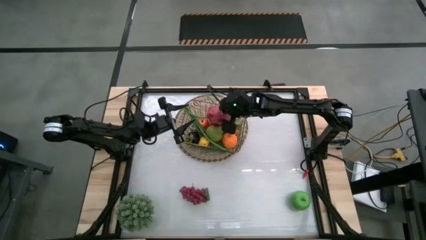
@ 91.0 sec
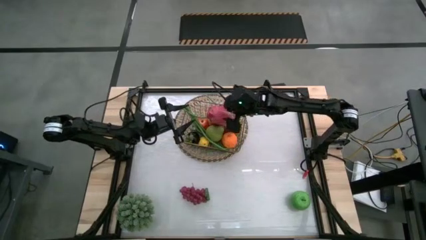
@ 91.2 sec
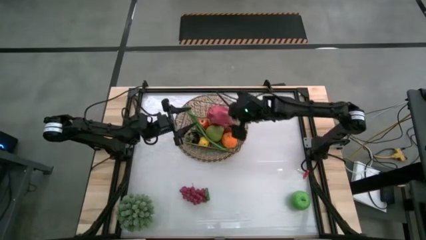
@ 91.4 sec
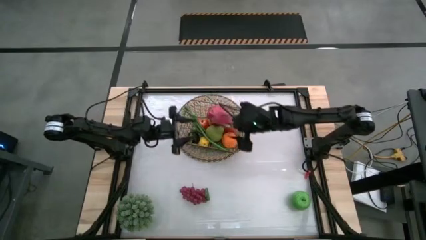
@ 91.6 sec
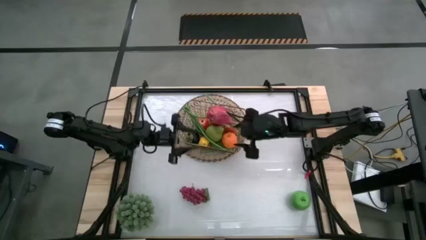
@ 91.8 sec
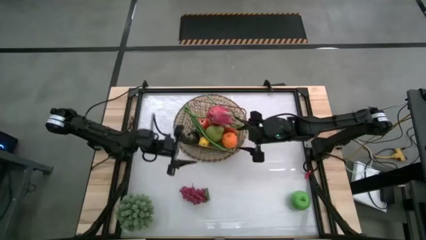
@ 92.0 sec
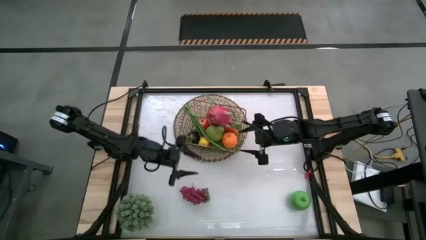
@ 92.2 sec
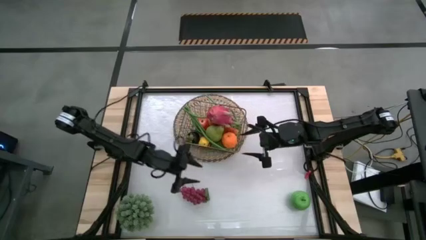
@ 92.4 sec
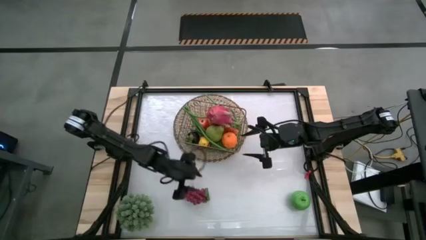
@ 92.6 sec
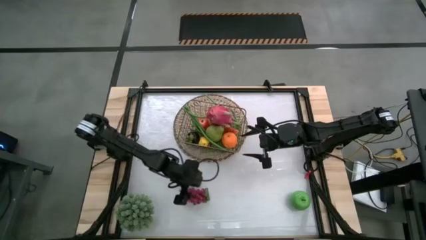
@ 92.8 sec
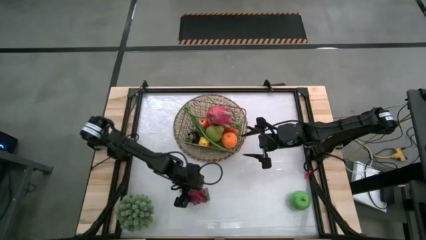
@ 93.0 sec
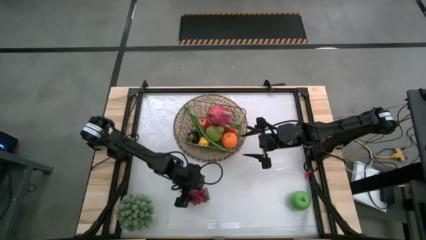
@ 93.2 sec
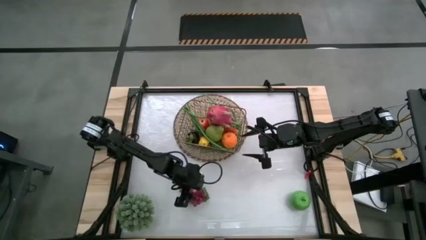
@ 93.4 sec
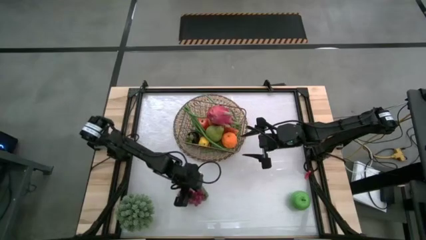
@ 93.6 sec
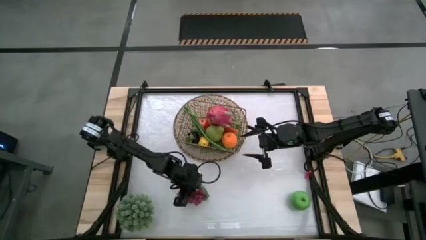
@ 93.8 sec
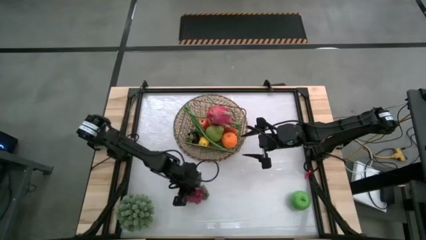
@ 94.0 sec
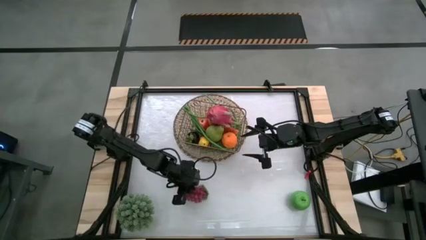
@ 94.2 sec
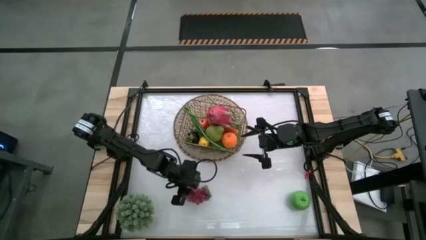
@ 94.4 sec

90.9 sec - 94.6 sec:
Task: Build produce basket
Put the grapes into the wire basket

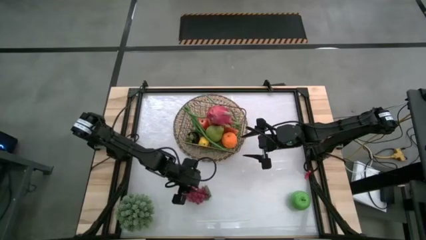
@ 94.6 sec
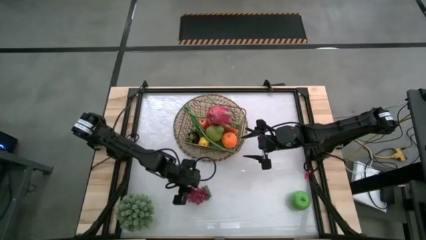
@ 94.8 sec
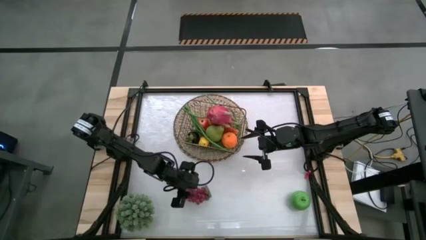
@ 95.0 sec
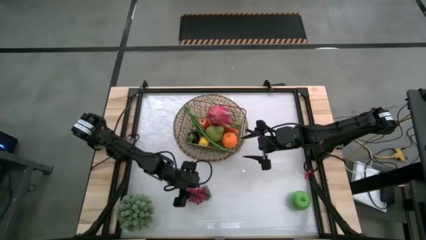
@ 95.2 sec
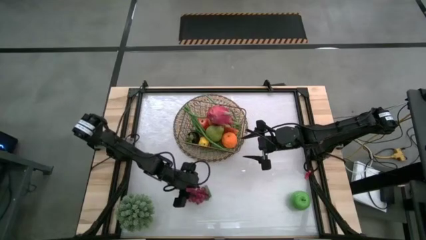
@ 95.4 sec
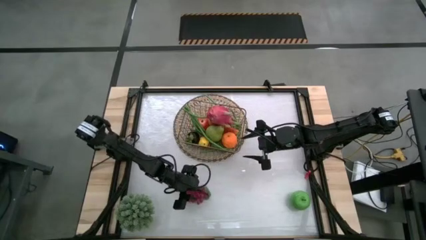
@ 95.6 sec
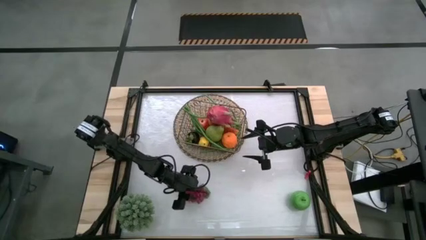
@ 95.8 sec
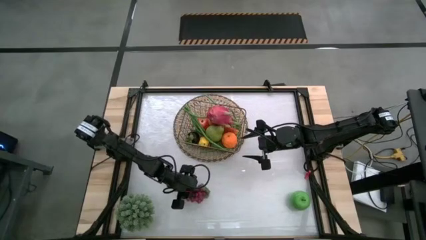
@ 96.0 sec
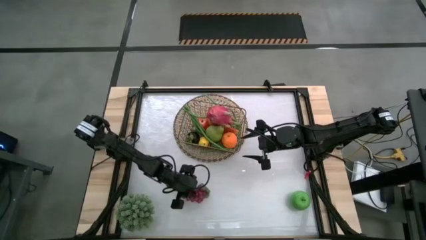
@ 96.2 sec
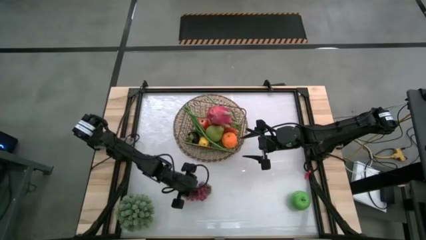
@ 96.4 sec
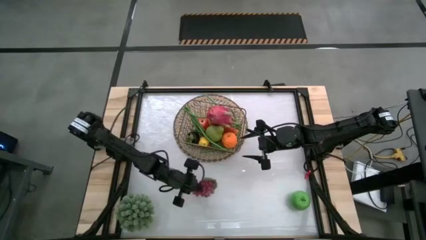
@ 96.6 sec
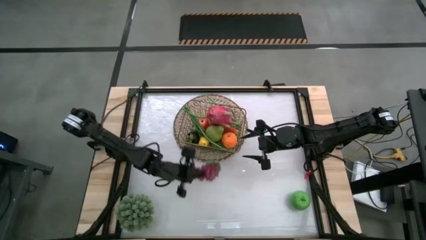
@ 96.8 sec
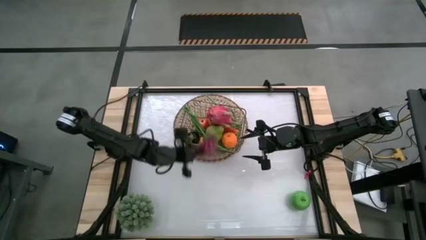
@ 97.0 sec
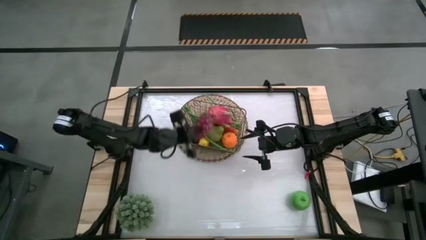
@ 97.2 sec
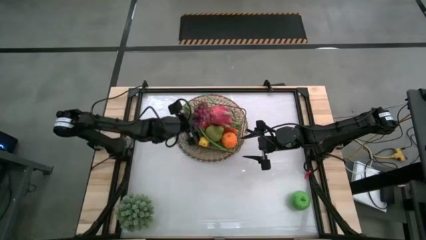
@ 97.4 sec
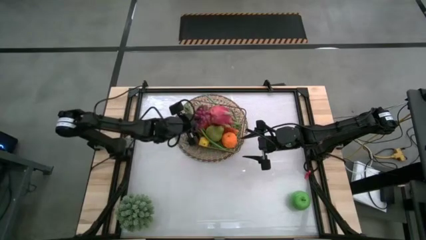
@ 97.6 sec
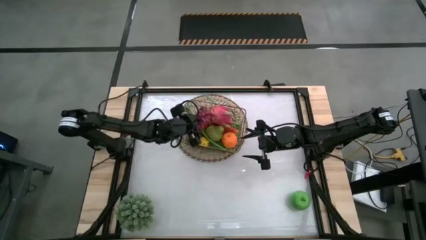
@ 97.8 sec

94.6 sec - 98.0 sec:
Put the grapes into the wire basket

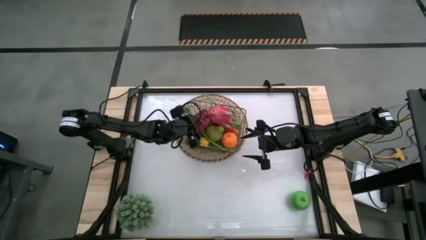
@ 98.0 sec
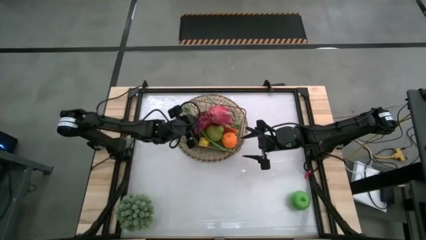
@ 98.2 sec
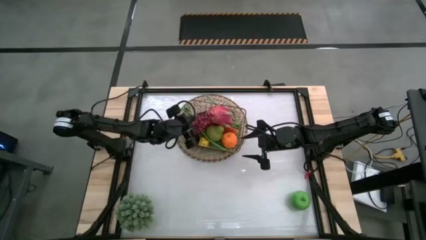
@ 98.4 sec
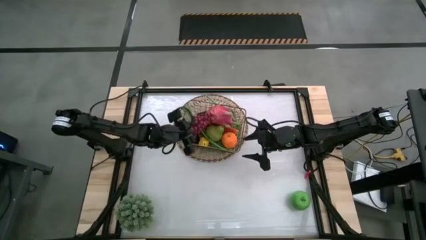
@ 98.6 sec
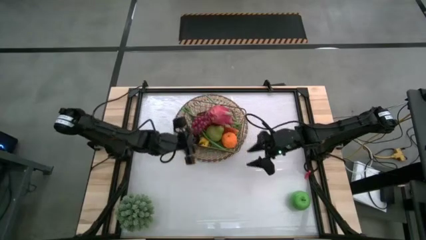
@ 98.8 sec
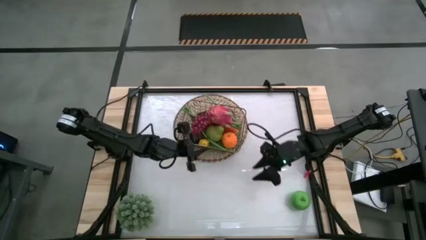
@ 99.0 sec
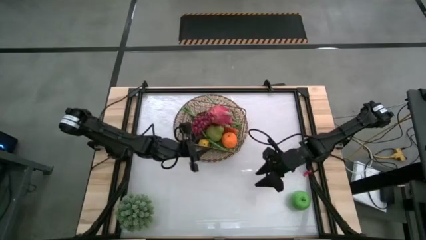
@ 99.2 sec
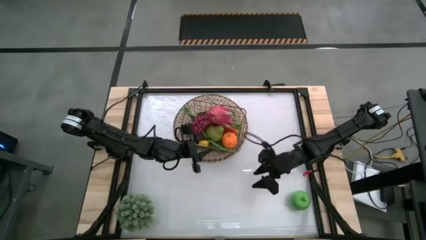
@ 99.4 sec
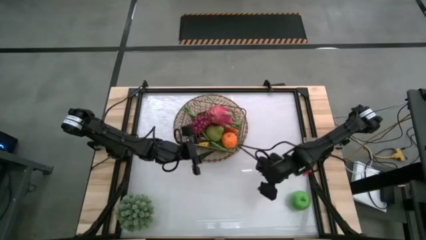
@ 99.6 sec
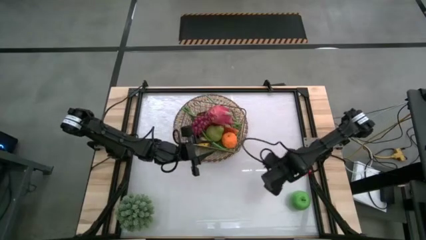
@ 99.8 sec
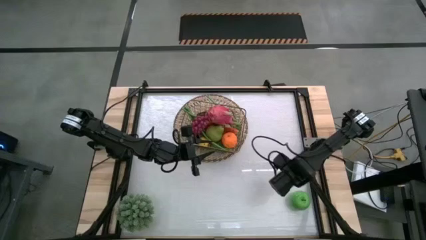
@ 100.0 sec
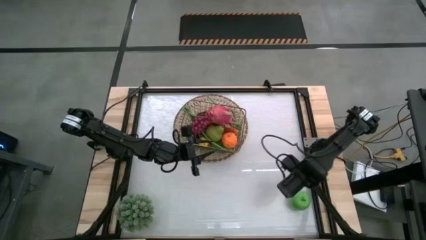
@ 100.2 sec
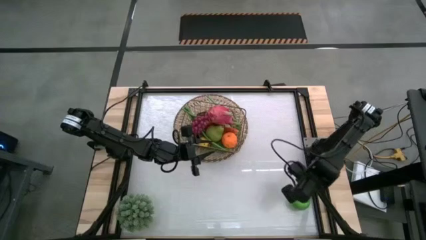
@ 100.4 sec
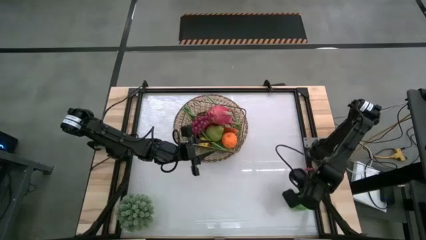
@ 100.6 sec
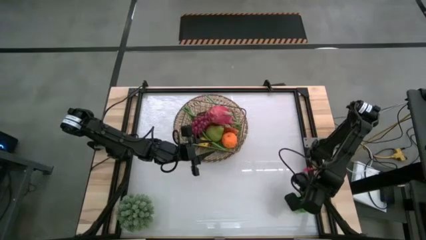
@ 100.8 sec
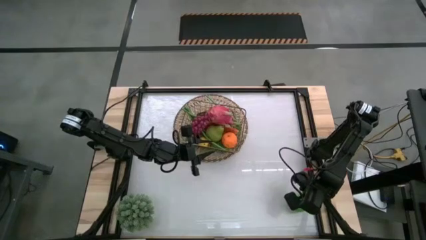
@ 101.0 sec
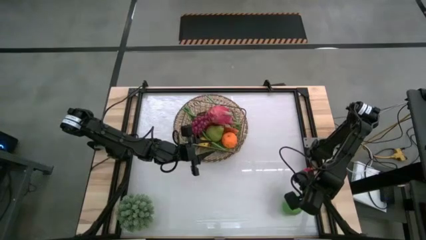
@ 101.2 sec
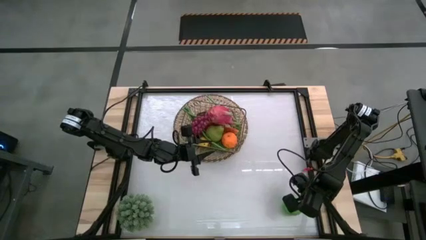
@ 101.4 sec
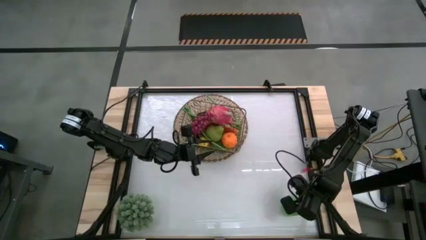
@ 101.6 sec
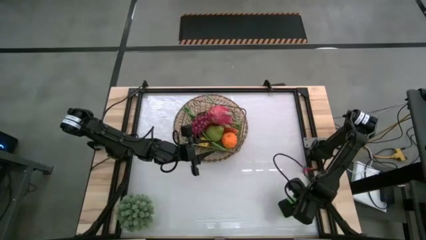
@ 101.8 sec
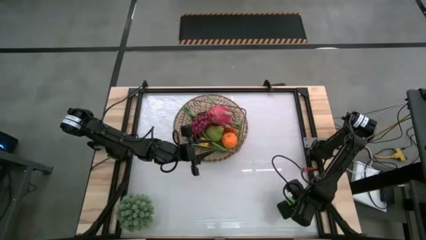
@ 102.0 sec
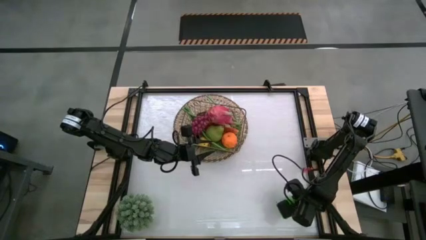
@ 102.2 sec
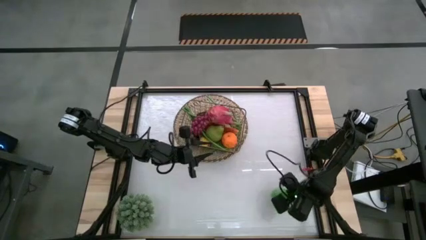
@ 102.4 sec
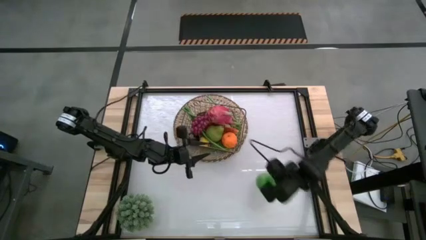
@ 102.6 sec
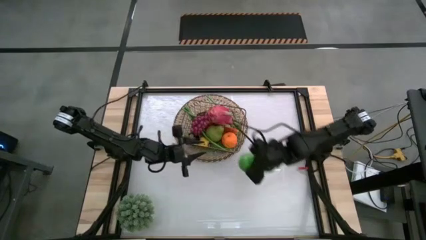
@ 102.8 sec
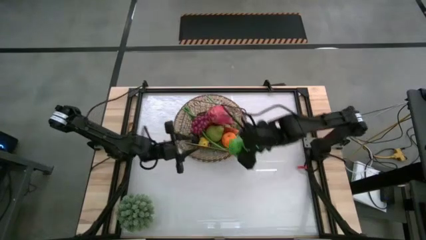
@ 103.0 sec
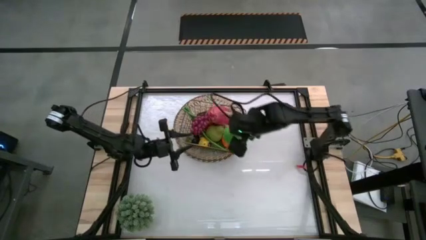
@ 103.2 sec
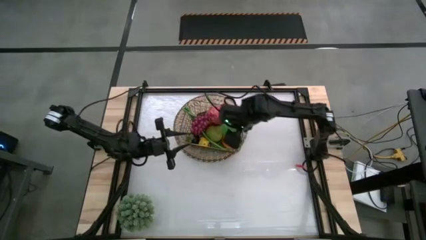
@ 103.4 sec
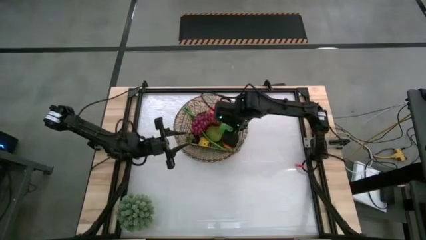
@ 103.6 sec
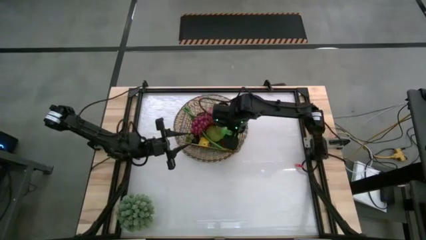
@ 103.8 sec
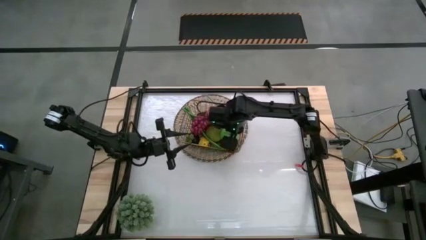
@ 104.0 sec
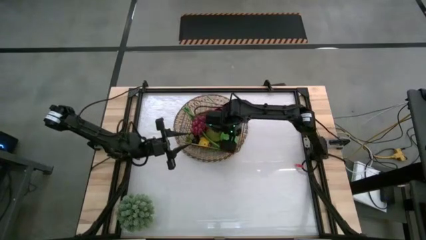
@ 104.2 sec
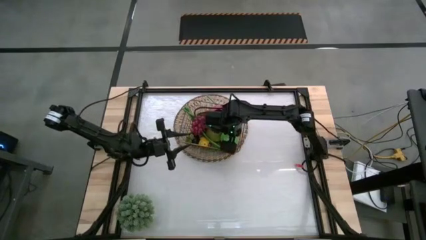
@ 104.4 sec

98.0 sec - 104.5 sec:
Put the apple into the wire basket
